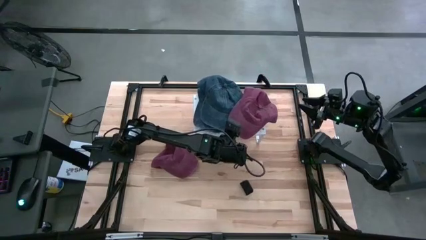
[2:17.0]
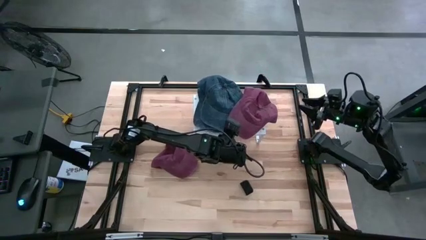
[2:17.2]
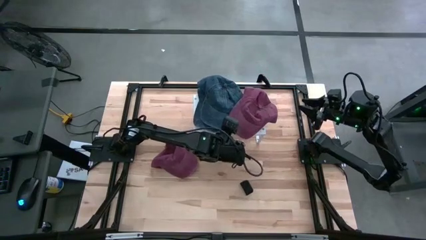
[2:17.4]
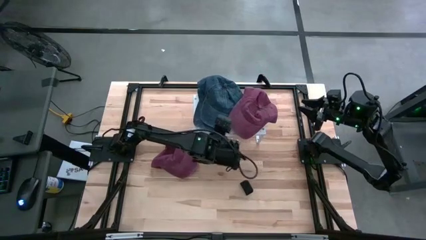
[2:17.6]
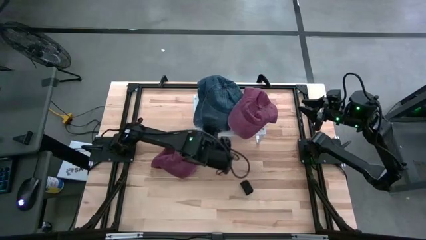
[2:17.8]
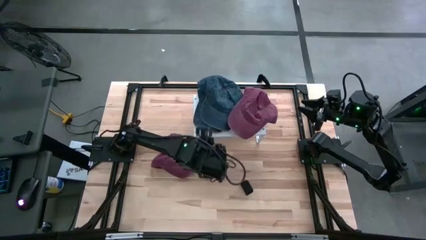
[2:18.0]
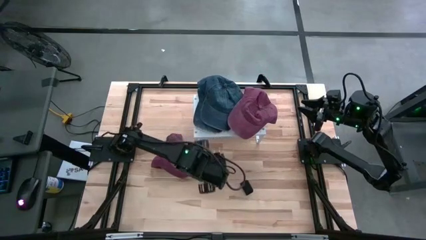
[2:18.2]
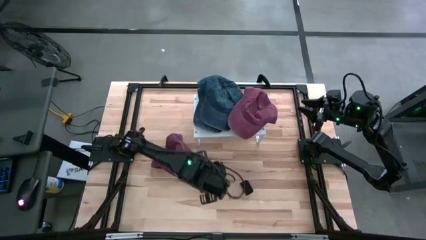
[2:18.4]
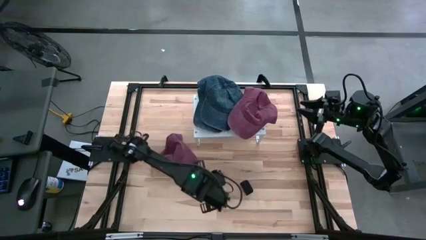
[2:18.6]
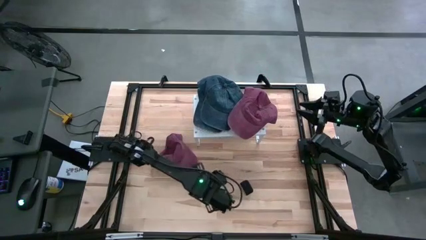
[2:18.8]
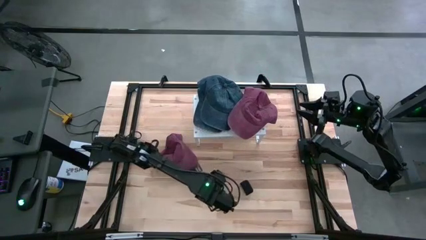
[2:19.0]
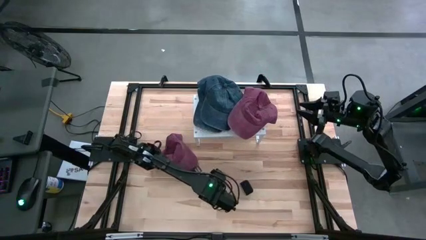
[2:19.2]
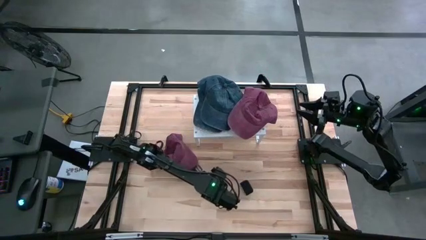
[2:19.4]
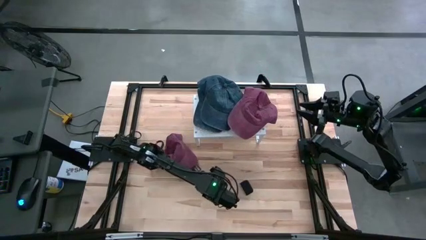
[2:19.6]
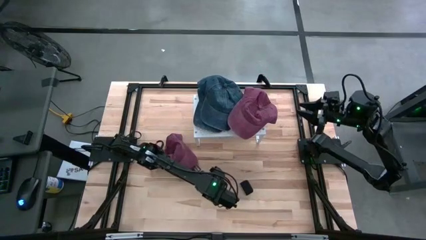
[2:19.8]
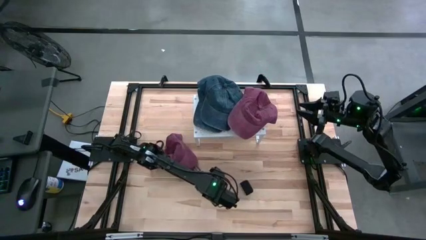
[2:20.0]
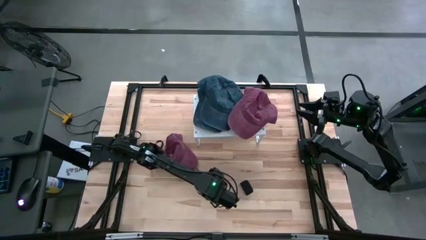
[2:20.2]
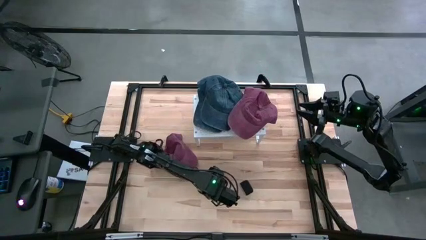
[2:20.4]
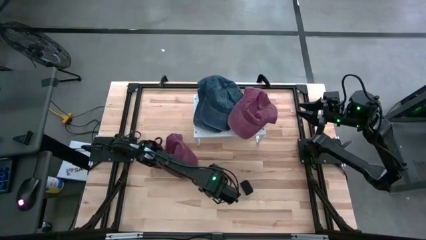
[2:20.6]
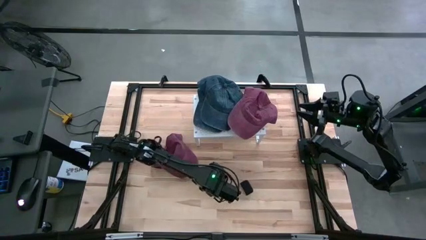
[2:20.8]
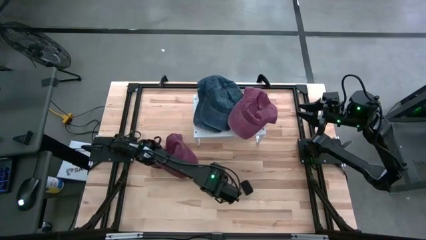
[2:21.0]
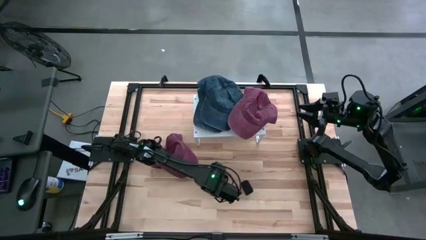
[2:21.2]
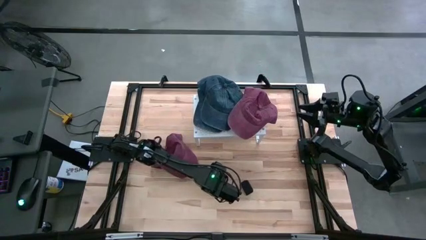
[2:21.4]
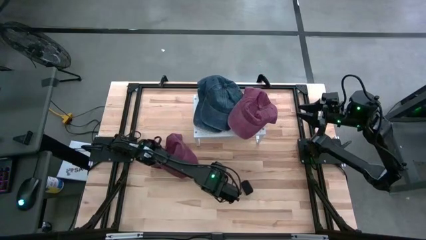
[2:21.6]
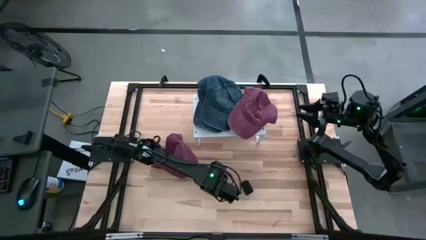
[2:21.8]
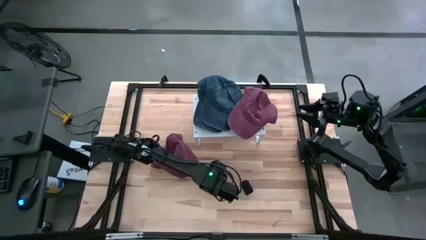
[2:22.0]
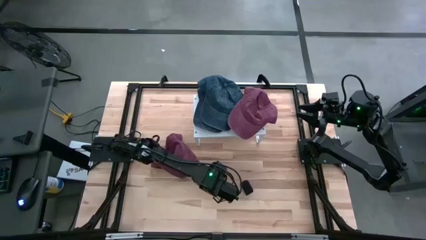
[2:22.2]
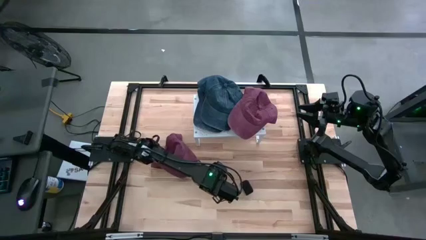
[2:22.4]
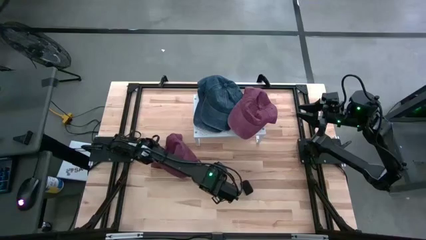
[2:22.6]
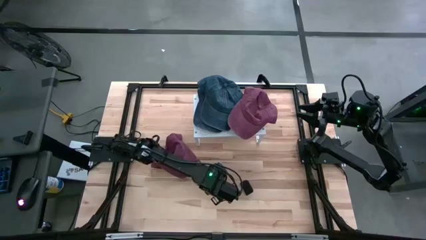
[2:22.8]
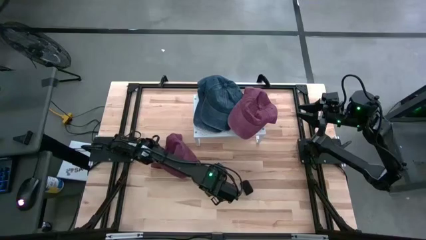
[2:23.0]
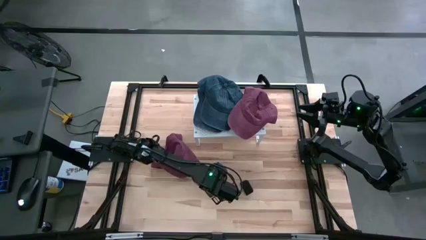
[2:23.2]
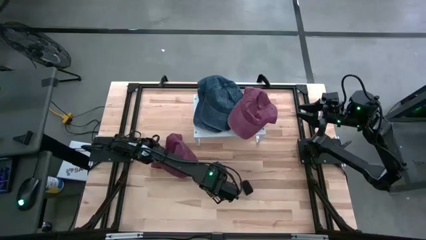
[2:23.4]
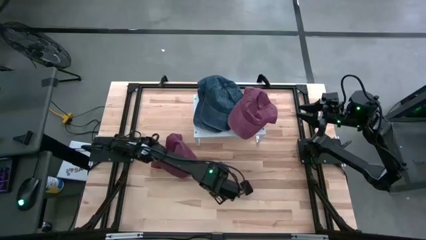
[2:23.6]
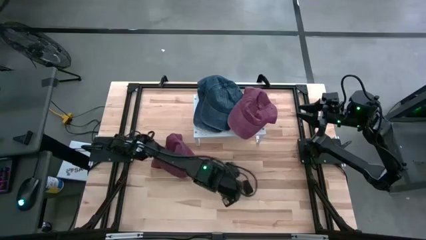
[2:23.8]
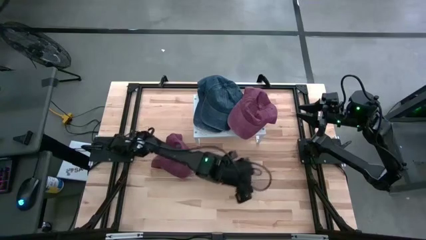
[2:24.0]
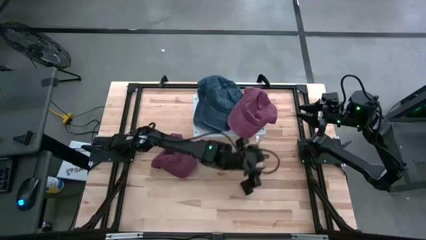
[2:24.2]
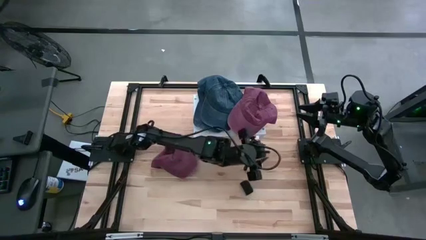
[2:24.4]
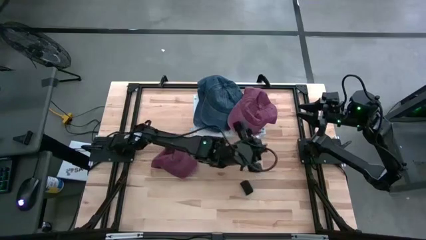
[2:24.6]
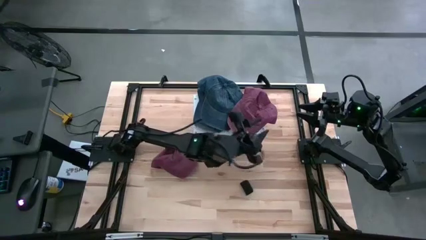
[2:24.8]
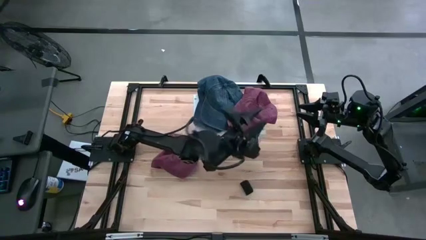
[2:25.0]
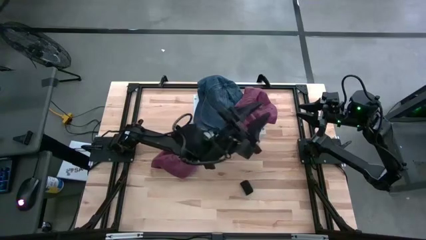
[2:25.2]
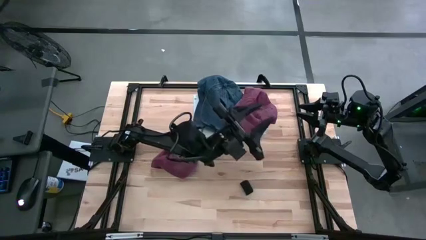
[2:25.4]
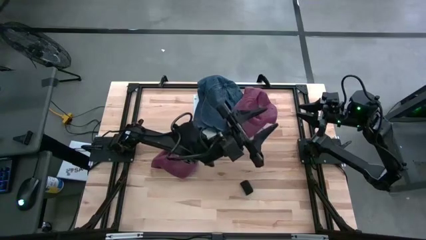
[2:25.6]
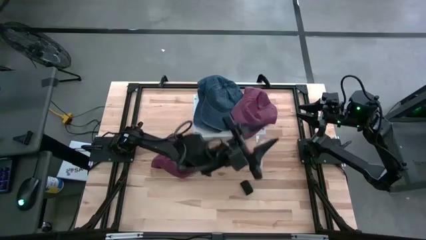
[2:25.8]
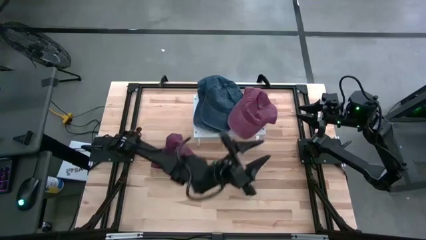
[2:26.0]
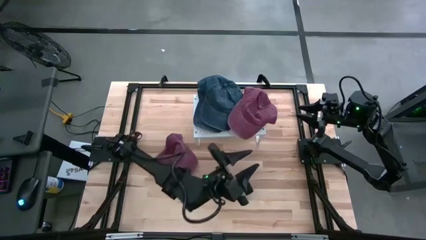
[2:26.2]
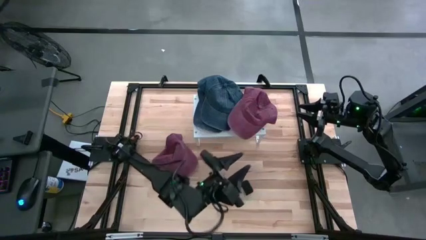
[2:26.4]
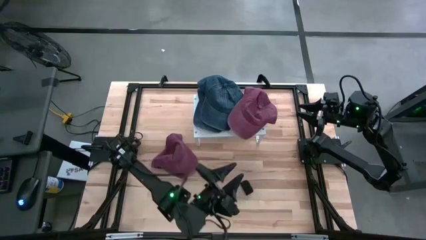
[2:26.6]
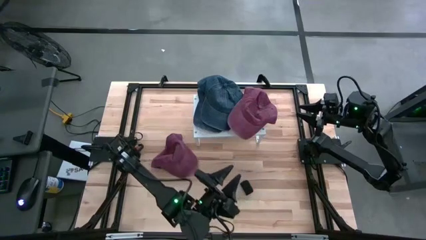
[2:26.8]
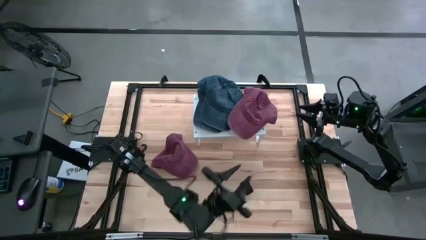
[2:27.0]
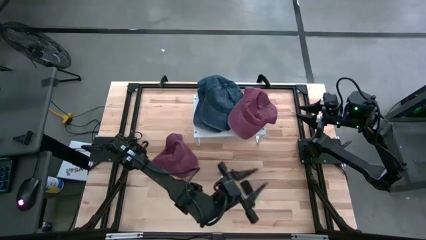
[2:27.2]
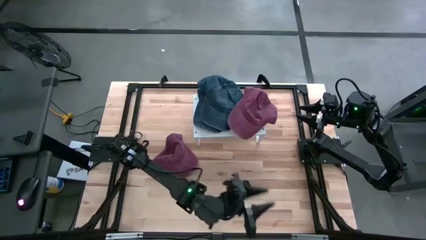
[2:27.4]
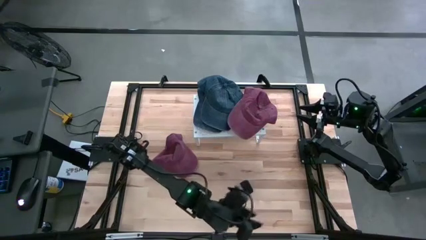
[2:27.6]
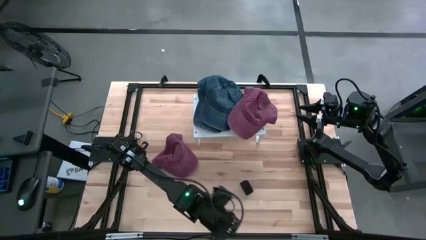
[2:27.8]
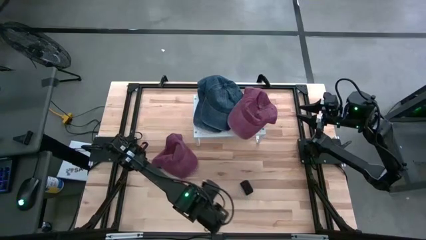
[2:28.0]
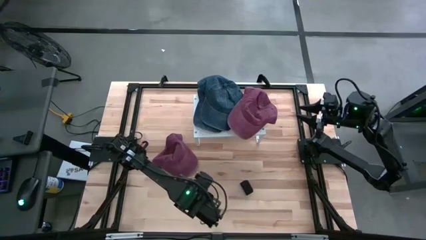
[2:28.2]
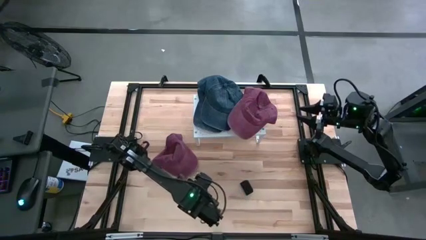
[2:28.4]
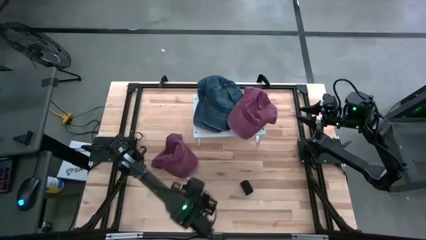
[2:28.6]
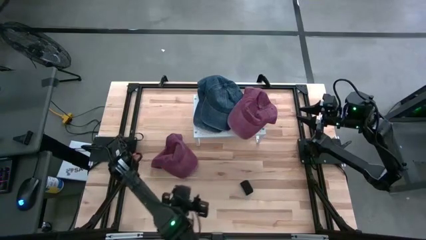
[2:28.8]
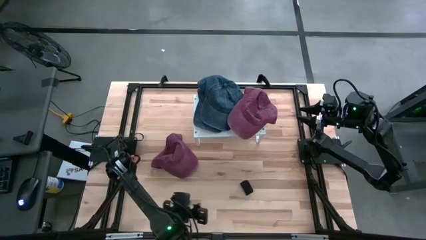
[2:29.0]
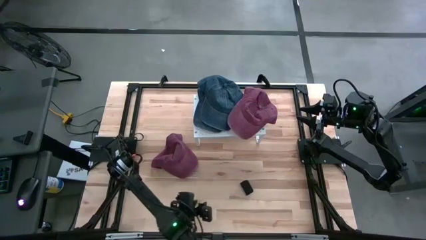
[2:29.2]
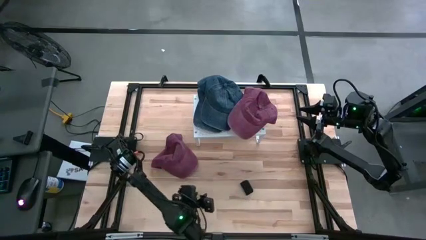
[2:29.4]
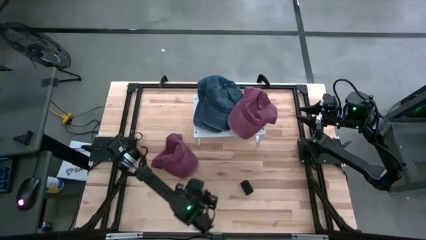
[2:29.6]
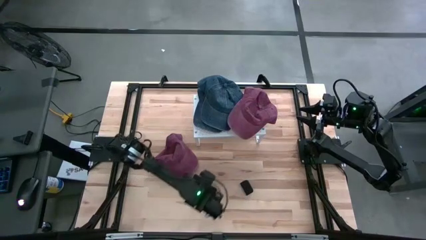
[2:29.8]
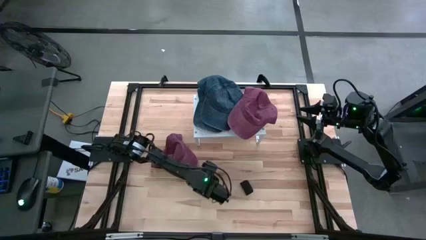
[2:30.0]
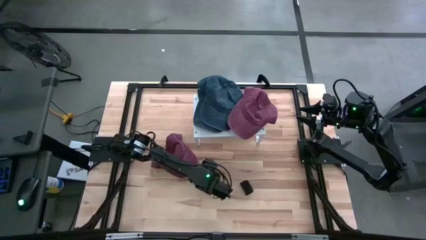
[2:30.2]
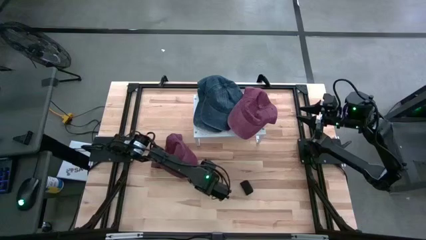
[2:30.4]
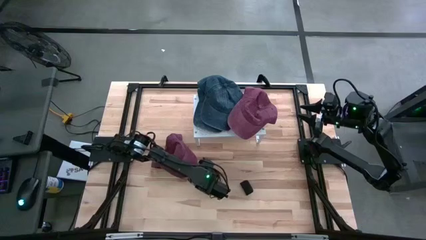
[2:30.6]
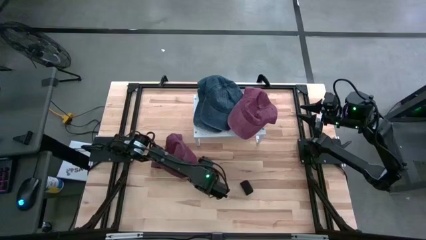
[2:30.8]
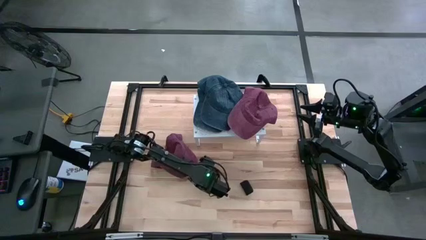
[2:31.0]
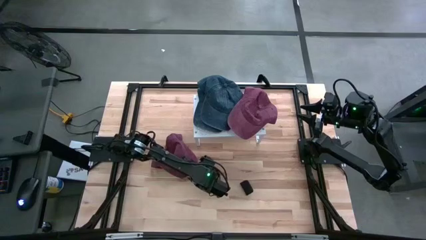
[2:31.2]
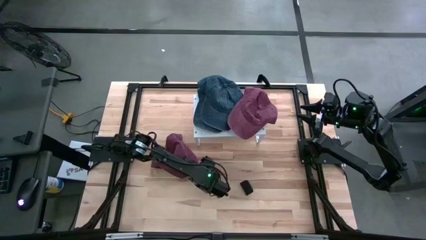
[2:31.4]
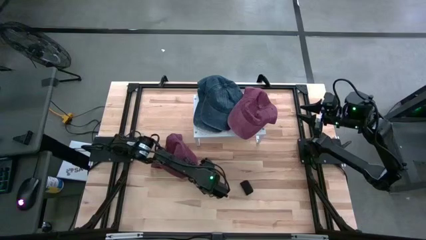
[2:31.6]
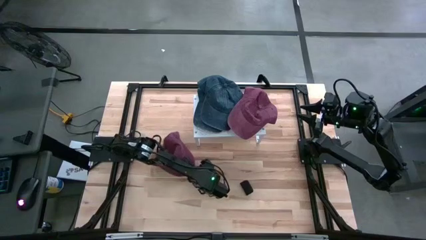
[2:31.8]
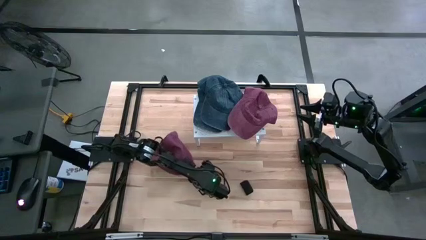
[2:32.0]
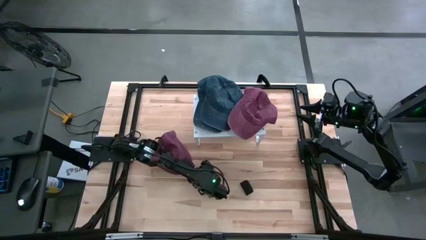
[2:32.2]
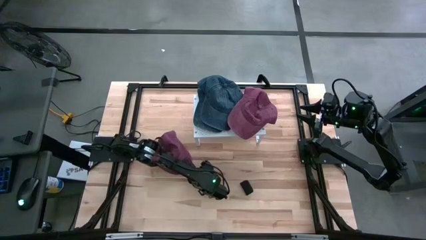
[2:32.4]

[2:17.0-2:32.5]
Task: Pick & Place hat
Stack the red cap on top of the other red cap on the shelf
